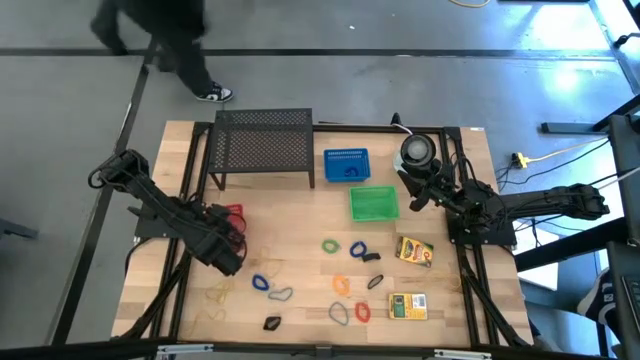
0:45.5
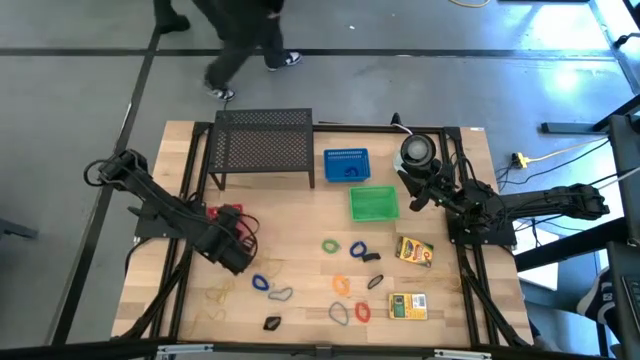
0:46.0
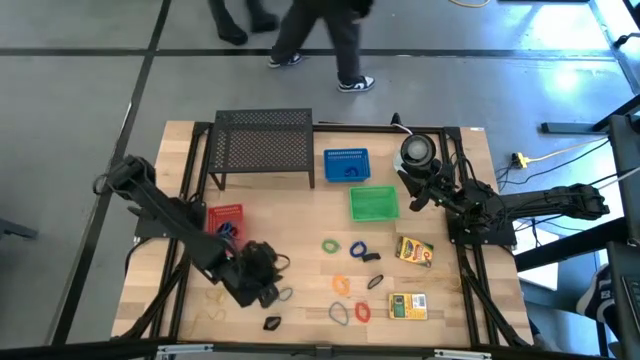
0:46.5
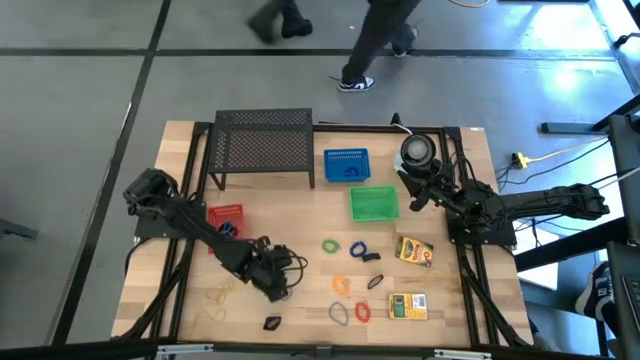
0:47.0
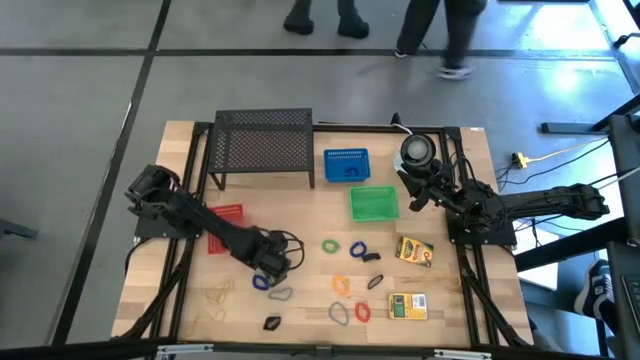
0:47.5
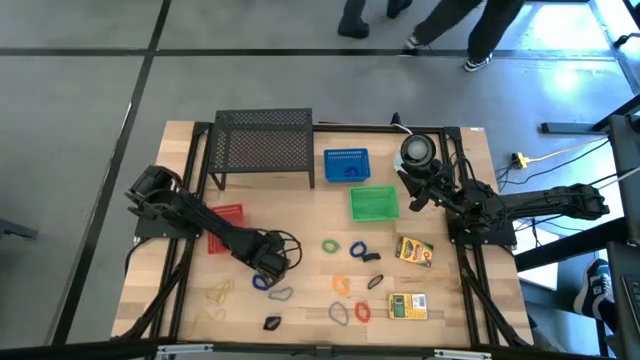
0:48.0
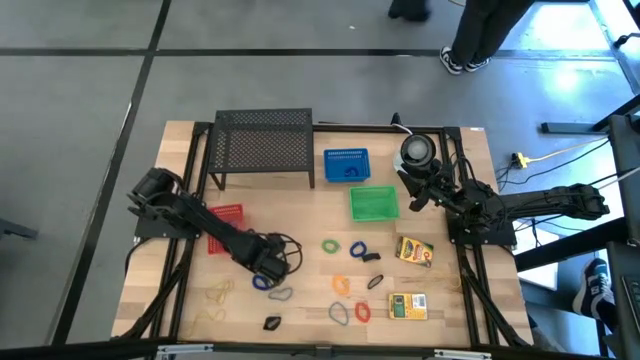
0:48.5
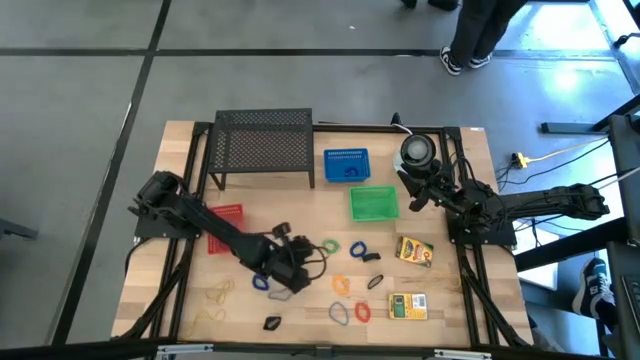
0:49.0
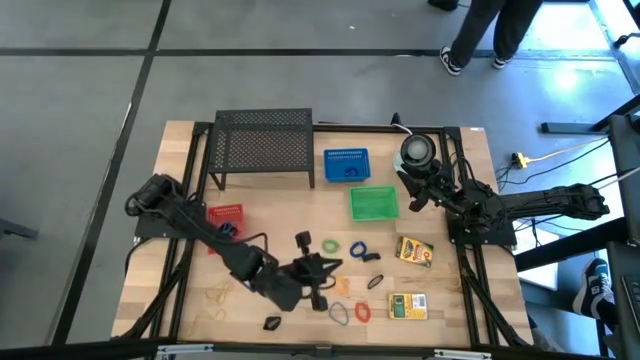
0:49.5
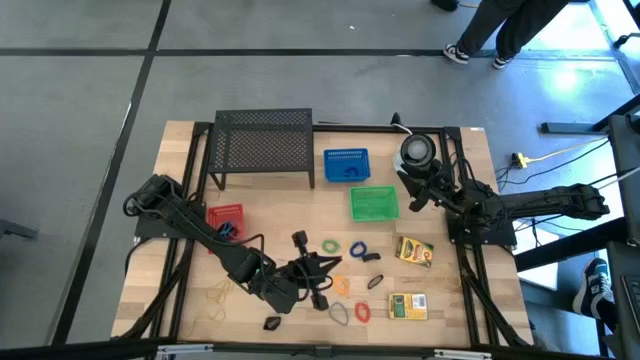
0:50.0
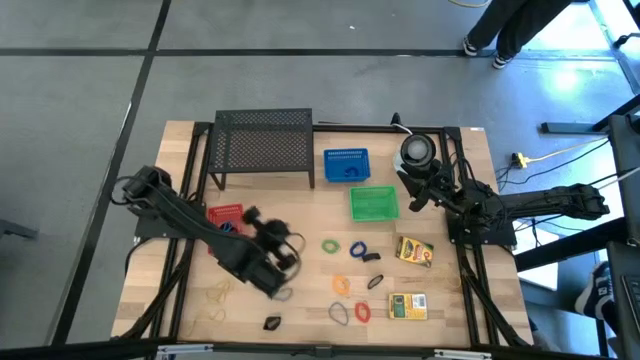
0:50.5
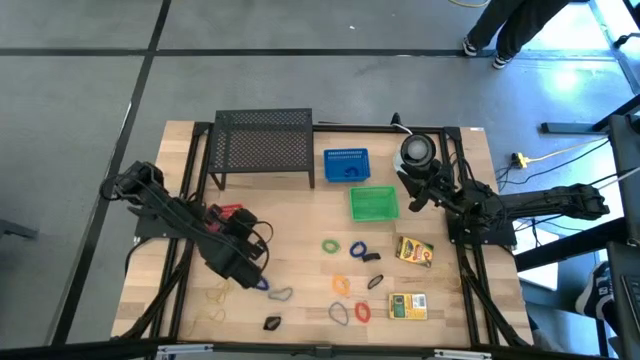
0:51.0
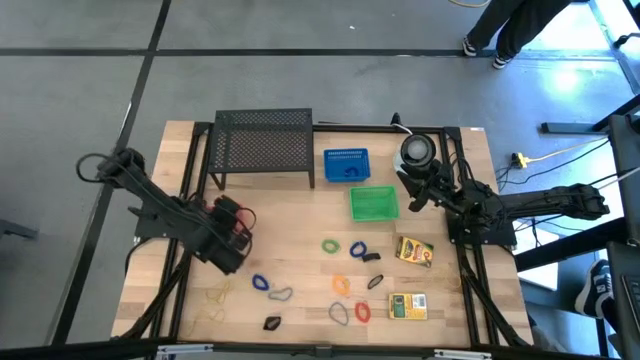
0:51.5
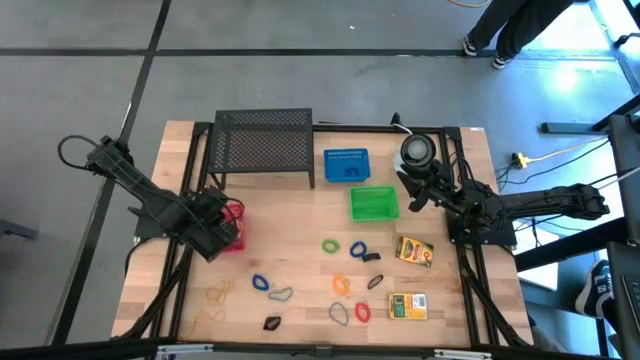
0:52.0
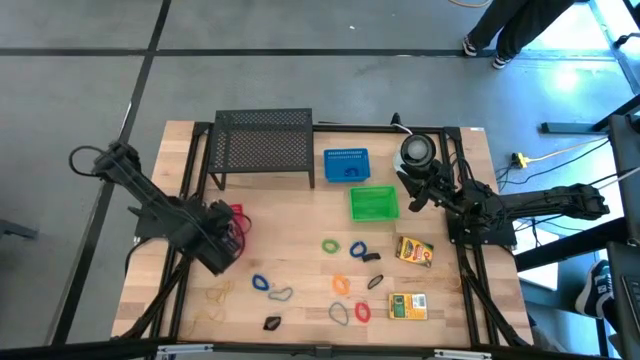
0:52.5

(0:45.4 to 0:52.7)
Task: Pick & Place Office Desk Supplies
Put the yellow rubber band into the orange basket

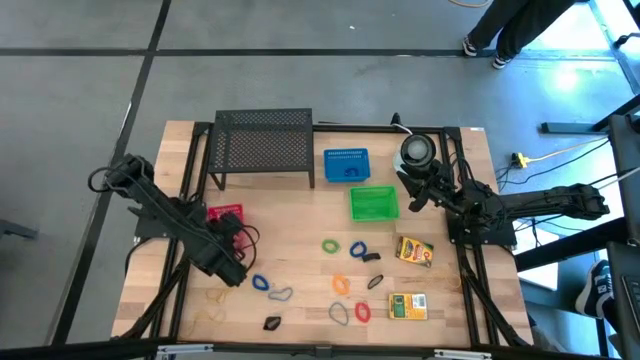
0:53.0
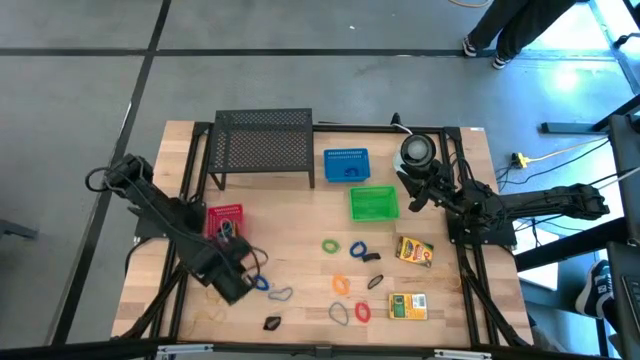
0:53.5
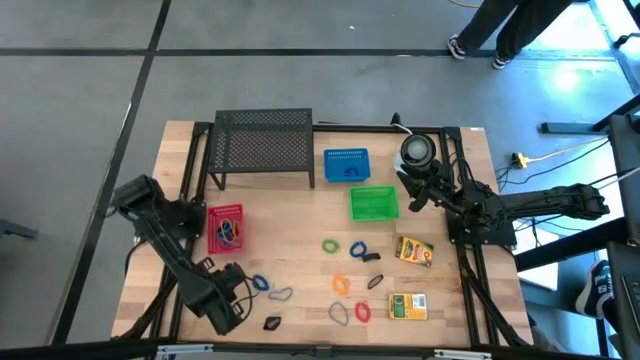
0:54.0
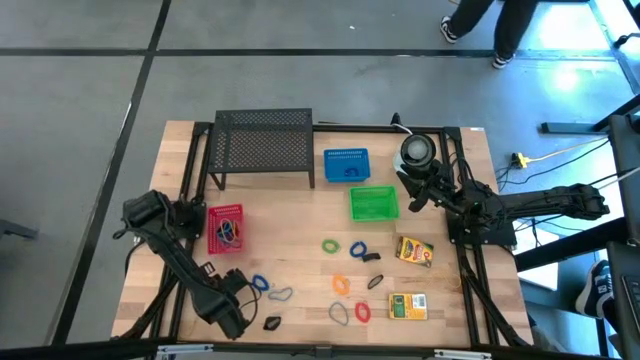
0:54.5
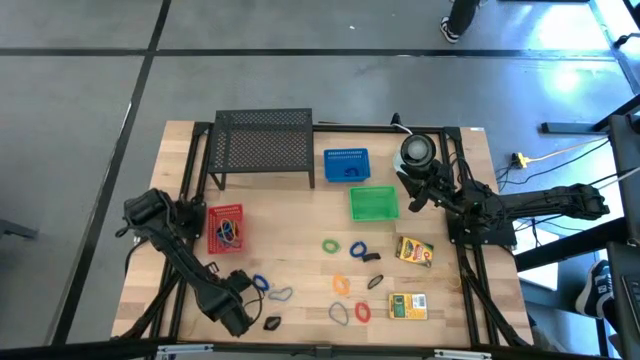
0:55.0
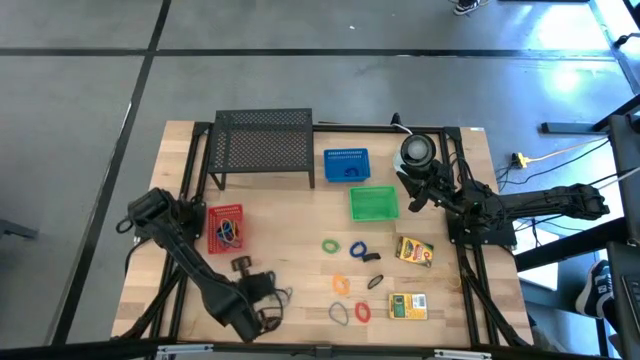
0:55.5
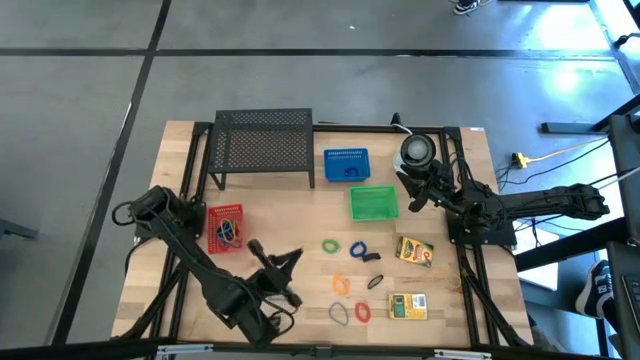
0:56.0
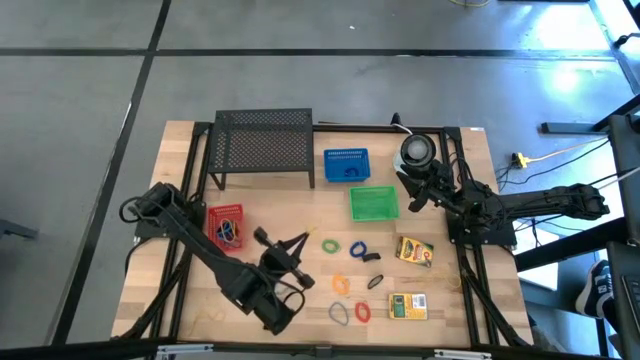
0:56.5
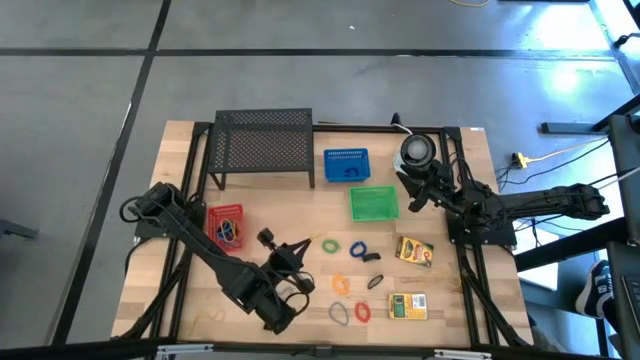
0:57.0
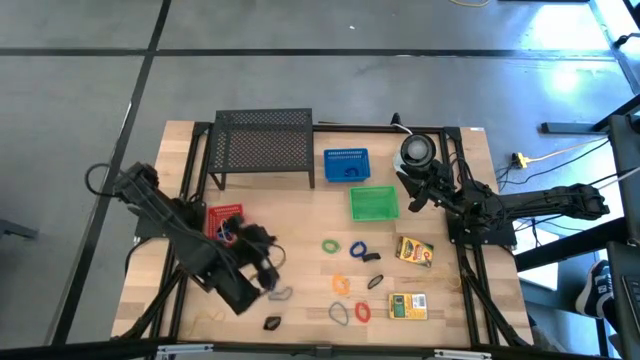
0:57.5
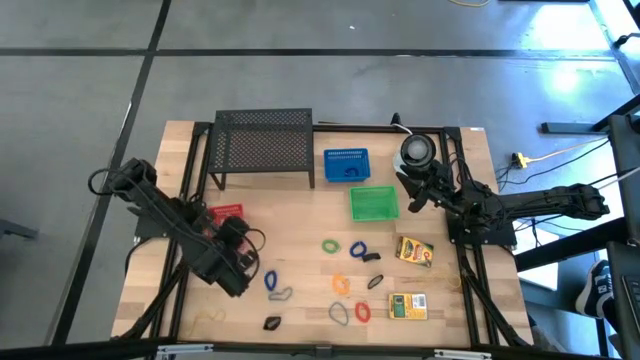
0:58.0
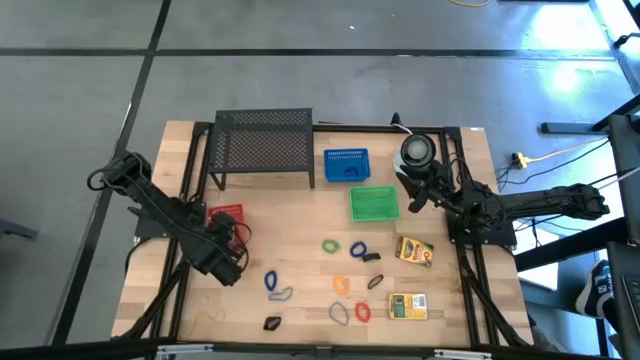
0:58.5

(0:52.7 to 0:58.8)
Put the yellow rubber band into the orange basket

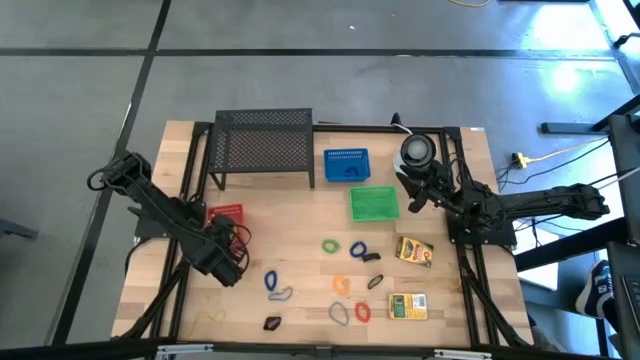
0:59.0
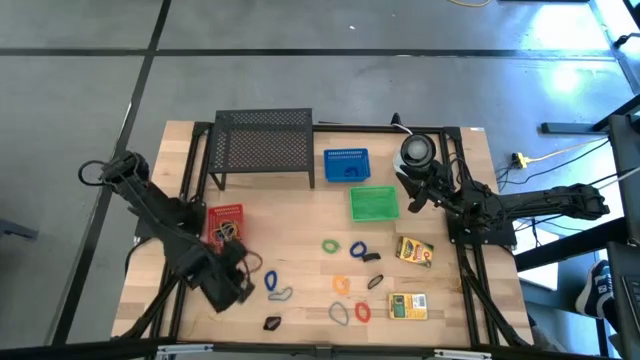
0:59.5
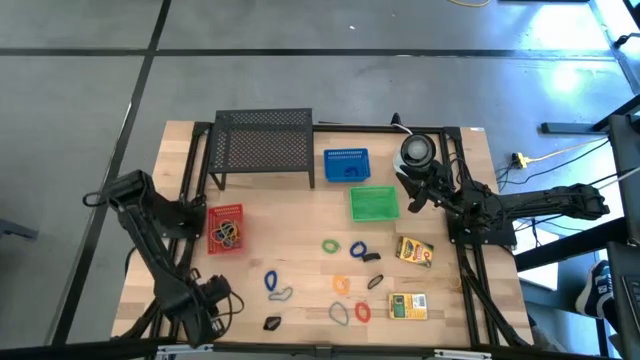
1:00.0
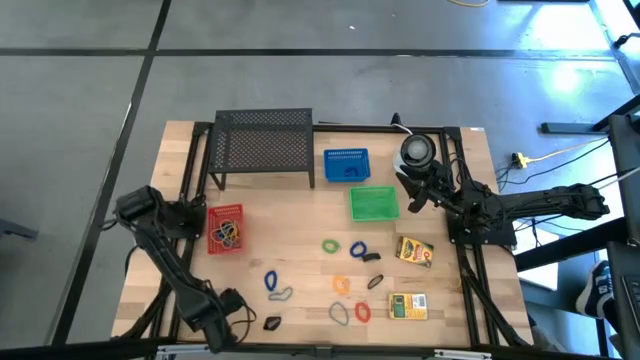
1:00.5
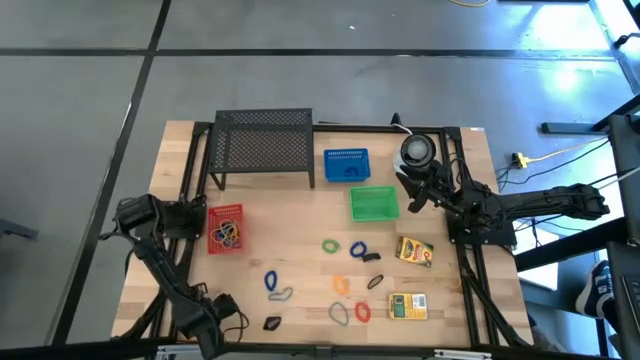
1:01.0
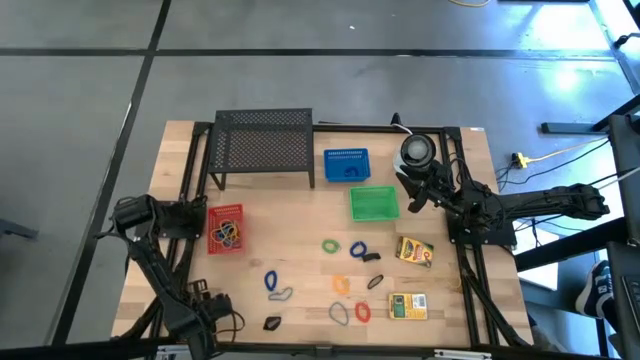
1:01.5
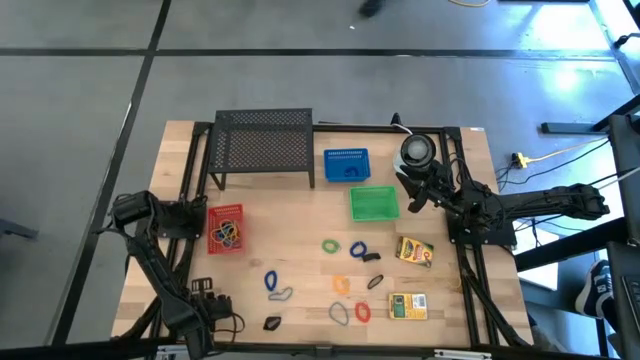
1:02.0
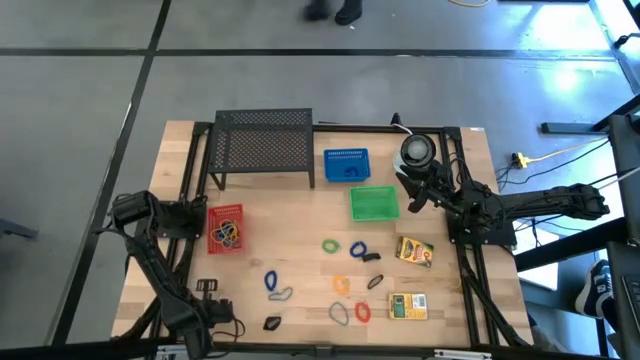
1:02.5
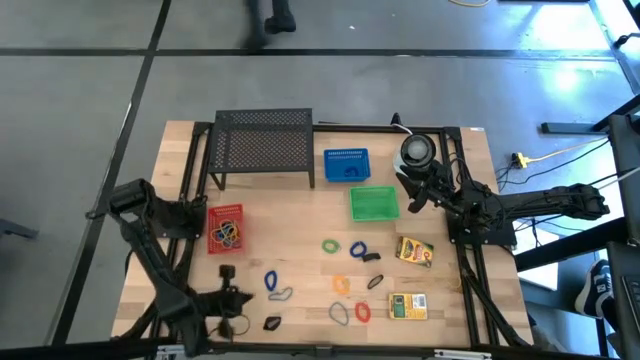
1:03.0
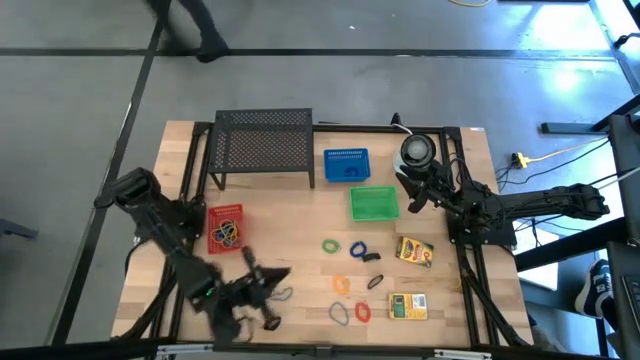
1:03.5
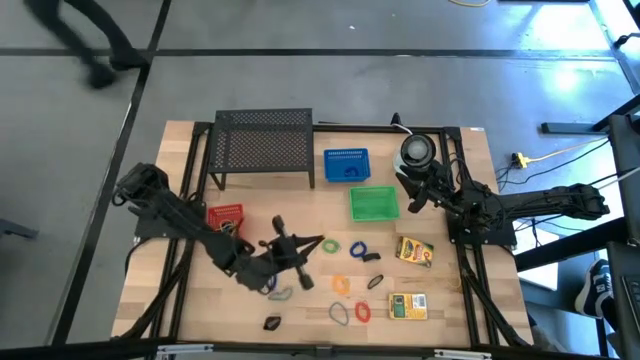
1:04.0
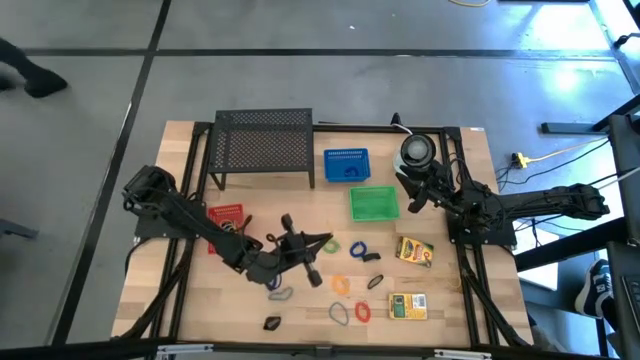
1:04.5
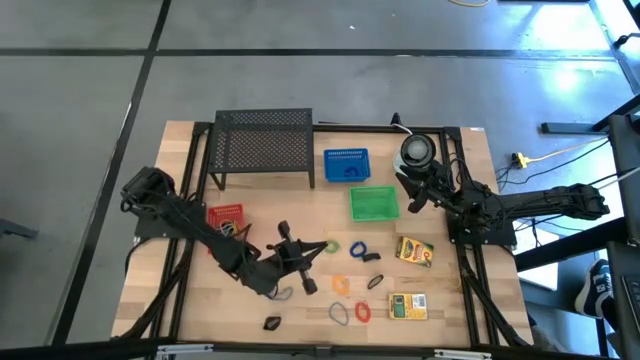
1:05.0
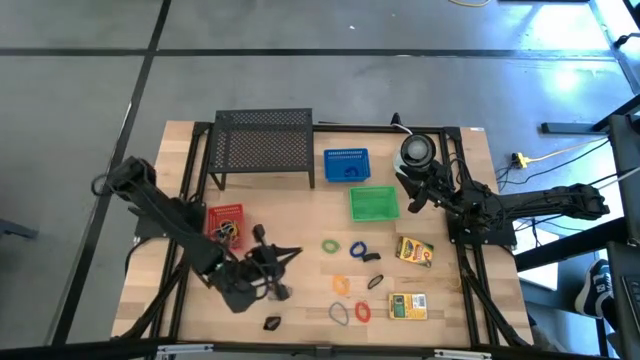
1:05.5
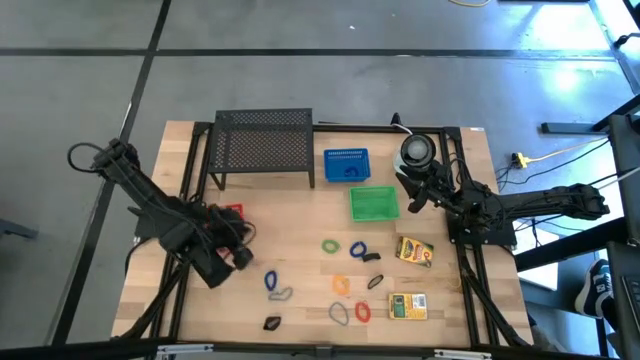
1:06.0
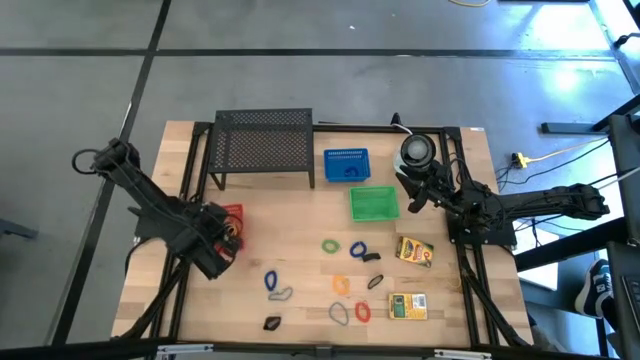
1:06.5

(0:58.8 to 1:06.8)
Put the yellow rubber band into the orange basket
